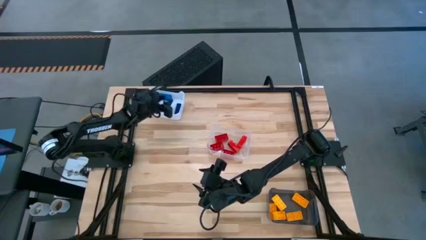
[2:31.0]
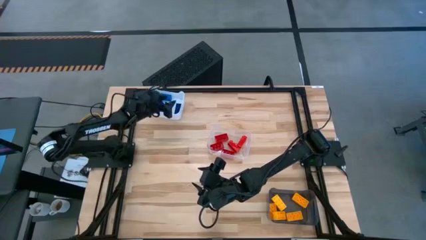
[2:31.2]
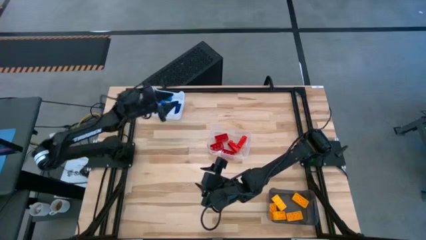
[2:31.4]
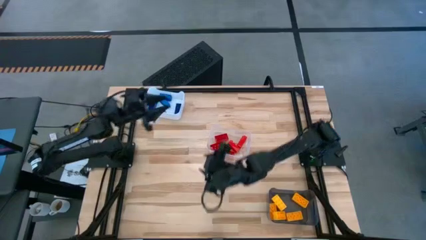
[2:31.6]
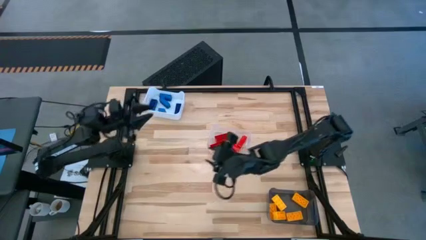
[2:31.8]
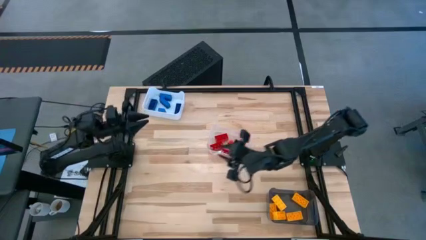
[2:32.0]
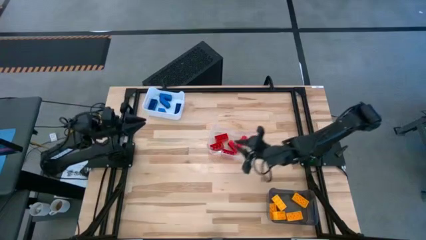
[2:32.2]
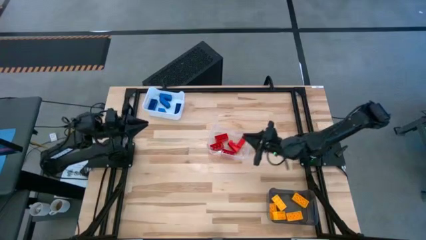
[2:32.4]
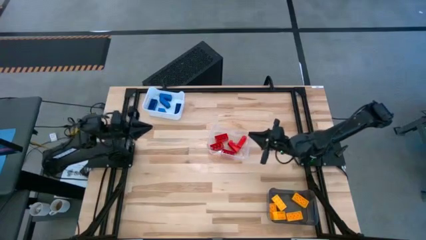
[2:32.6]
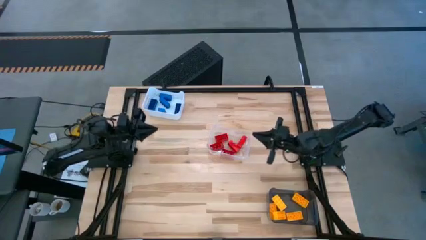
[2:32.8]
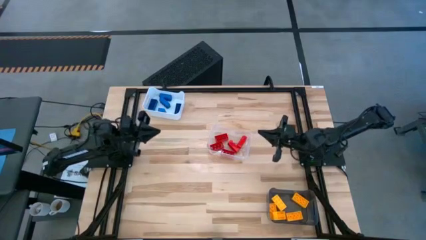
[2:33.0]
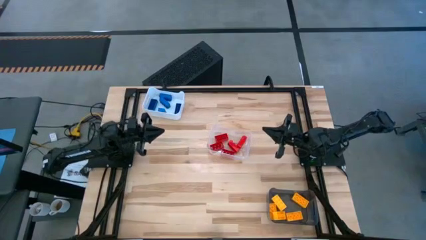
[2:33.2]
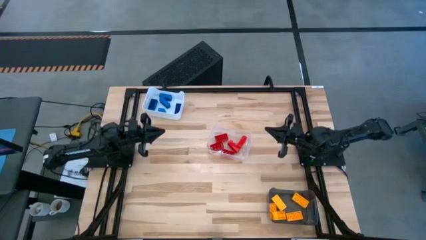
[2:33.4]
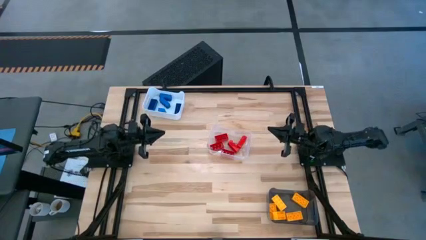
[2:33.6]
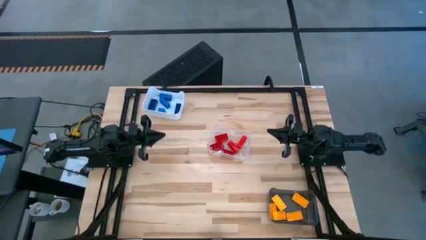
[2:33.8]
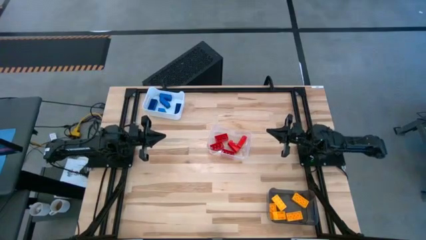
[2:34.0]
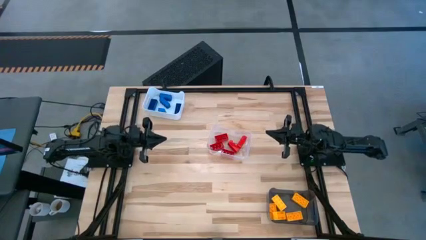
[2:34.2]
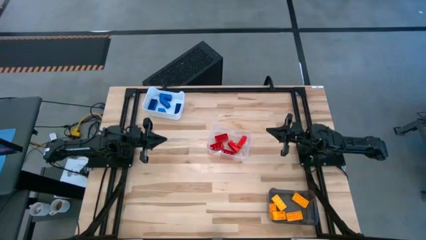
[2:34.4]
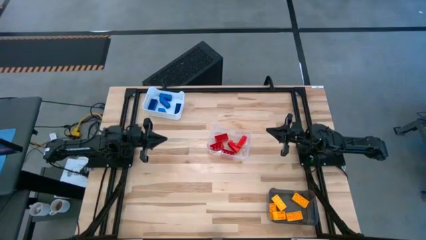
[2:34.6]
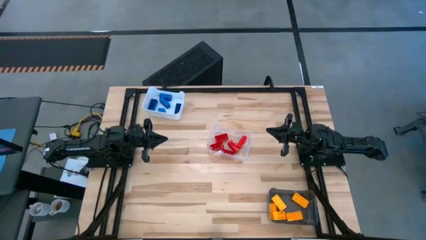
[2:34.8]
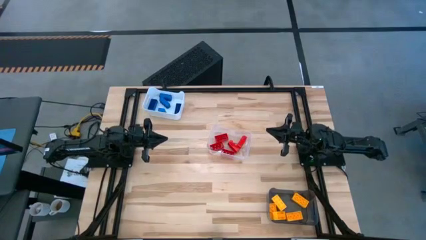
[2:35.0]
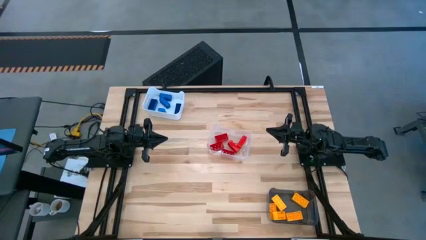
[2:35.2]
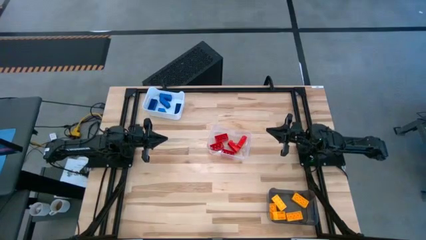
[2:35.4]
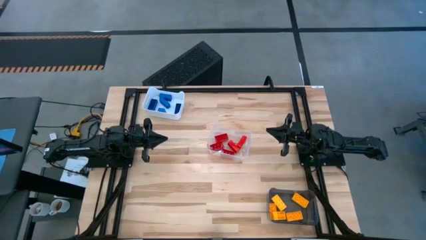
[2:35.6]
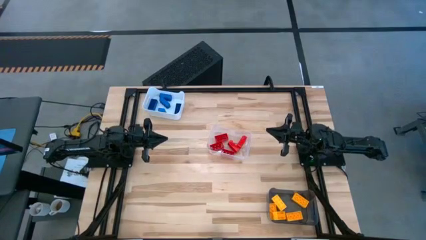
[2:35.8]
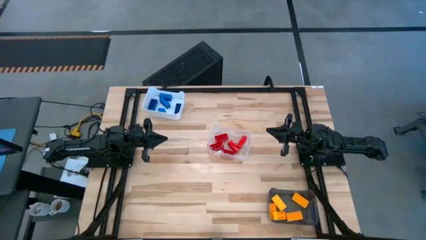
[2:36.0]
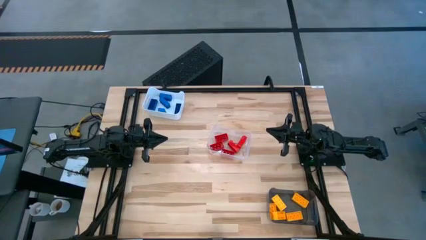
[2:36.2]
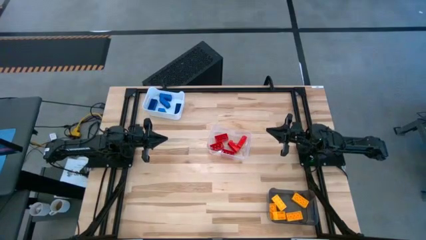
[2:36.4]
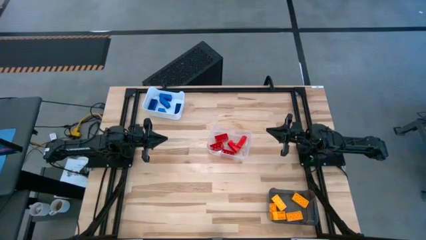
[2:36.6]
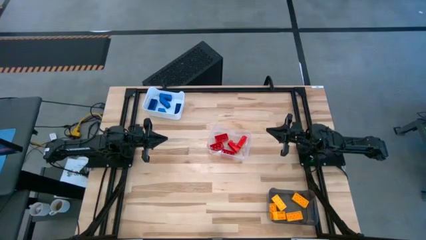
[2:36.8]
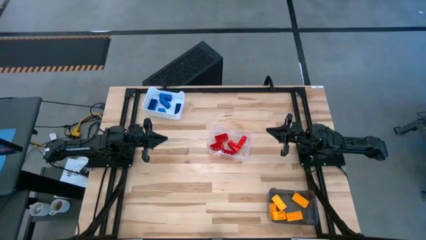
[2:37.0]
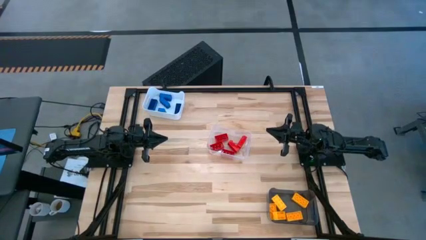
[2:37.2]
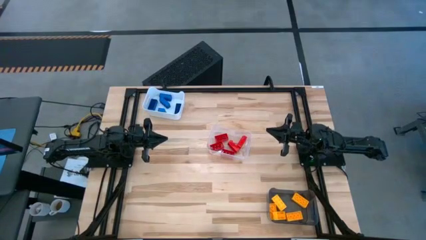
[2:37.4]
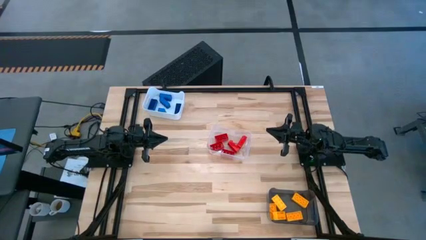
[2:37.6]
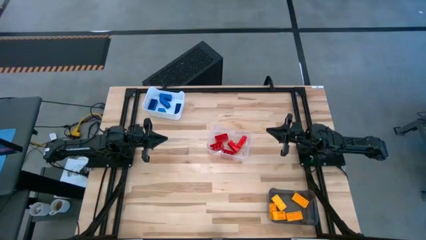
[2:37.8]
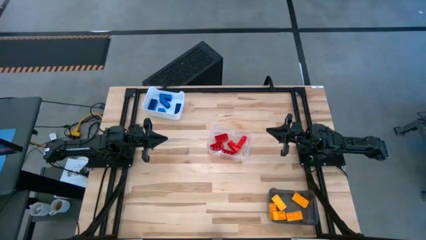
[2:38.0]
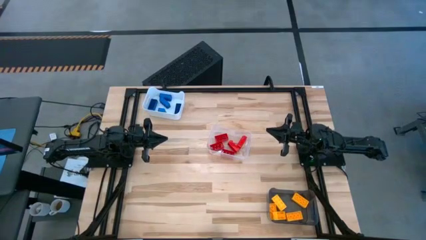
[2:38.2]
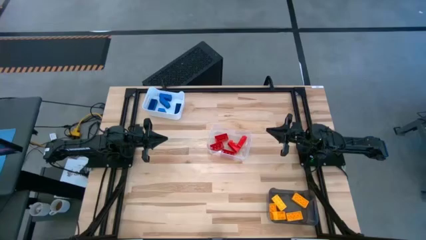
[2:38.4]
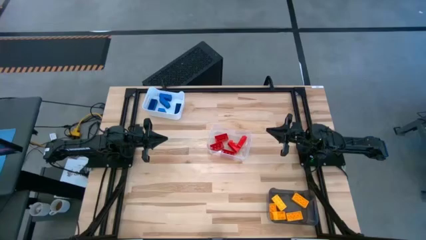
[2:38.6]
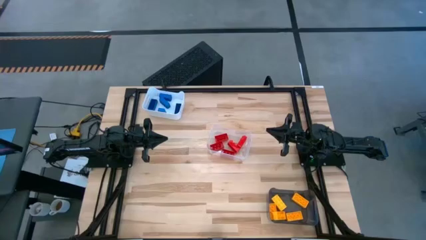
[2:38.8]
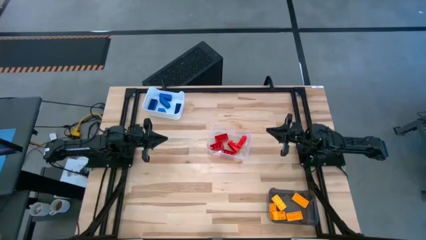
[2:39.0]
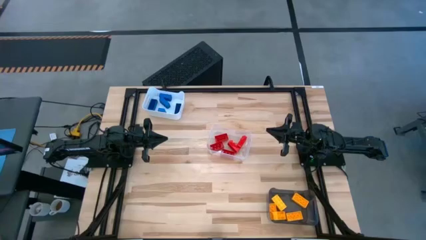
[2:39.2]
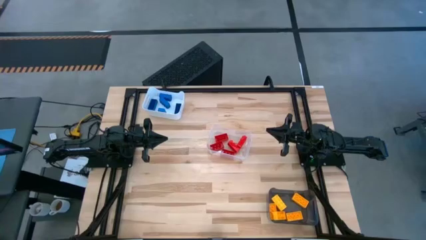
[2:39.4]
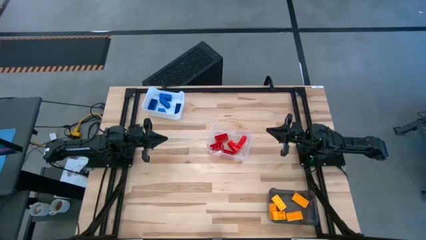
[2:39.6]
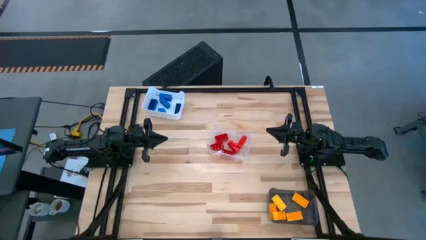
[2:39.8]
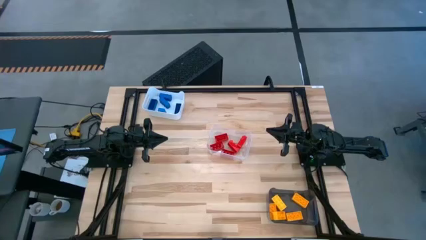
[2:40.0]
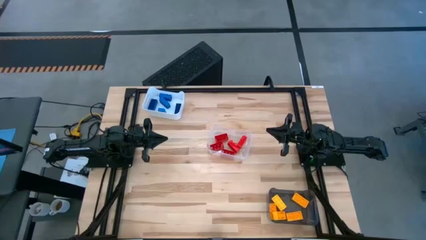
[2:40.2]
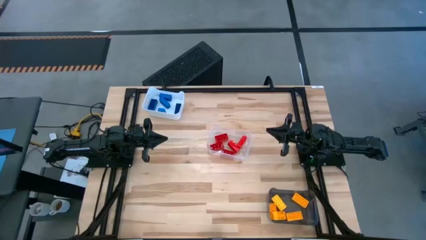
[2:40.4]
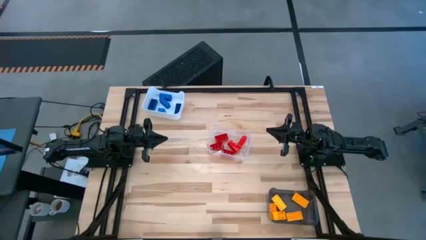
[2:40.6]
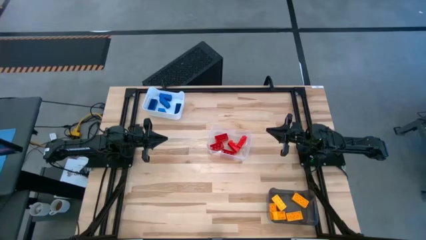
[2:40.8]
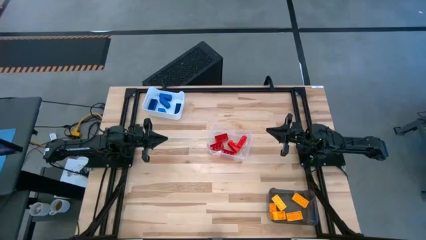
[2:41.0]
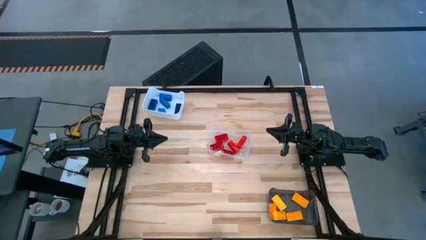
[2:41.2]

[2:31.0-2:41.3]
Task: Sort & place blocks by color
Return to Home Position

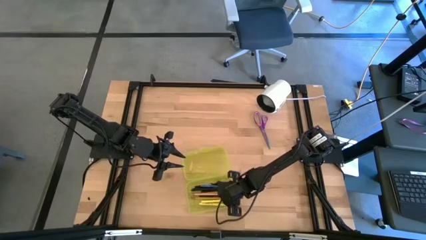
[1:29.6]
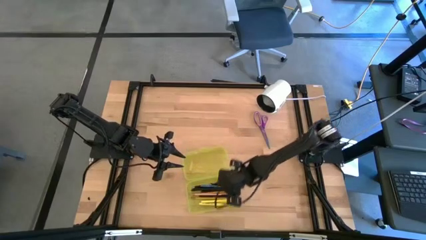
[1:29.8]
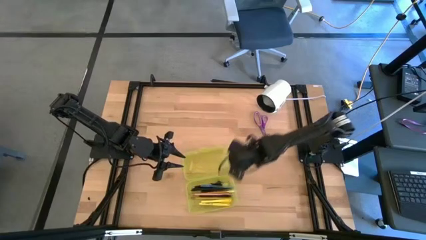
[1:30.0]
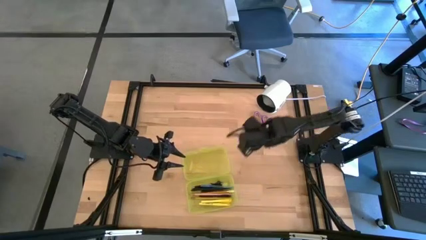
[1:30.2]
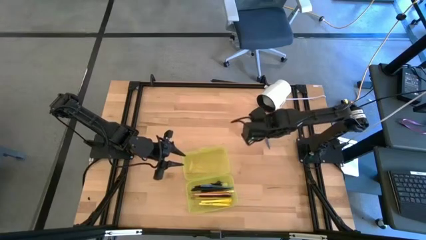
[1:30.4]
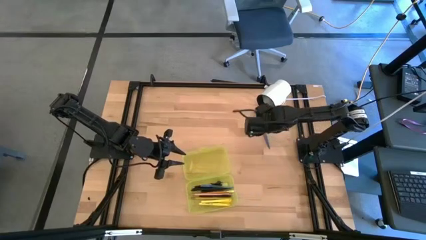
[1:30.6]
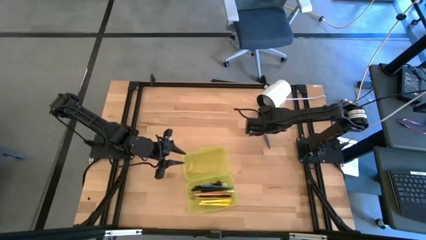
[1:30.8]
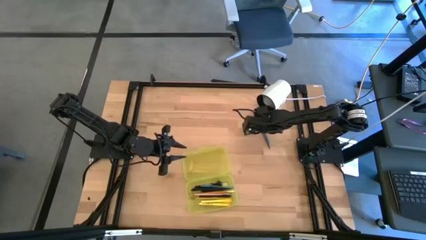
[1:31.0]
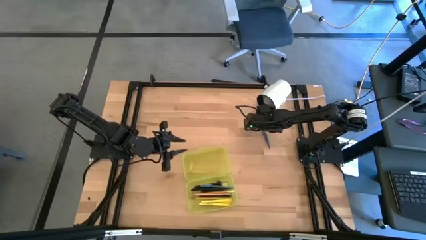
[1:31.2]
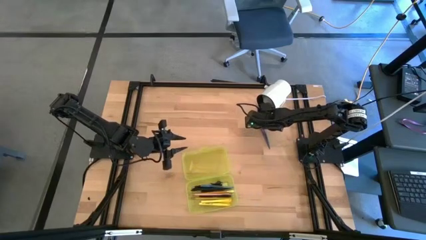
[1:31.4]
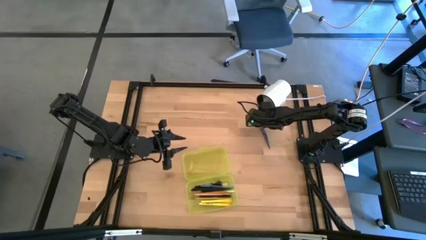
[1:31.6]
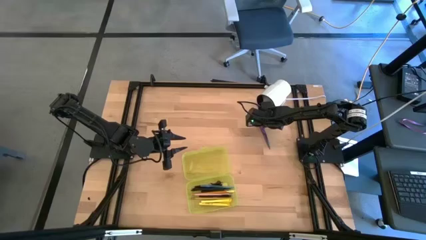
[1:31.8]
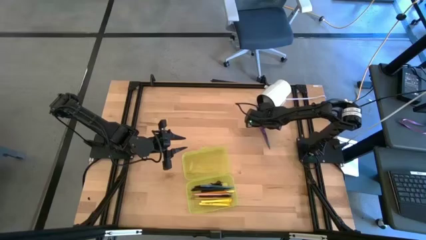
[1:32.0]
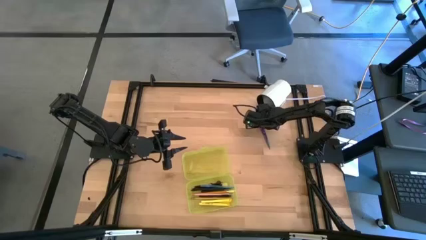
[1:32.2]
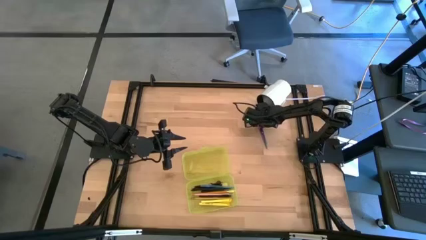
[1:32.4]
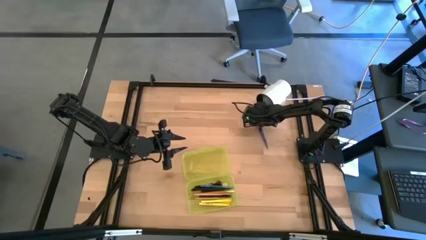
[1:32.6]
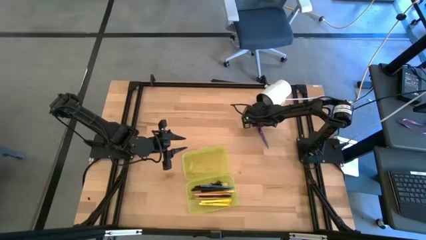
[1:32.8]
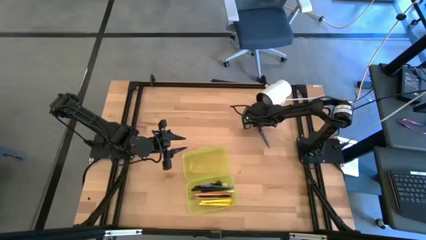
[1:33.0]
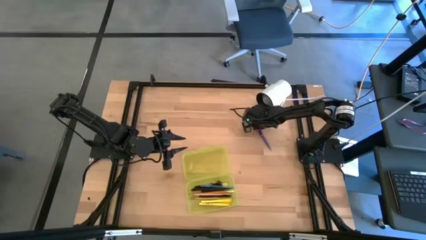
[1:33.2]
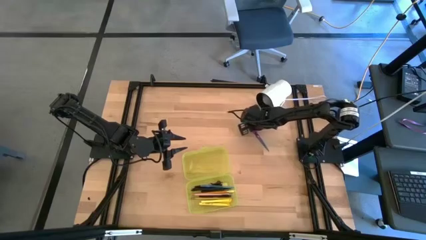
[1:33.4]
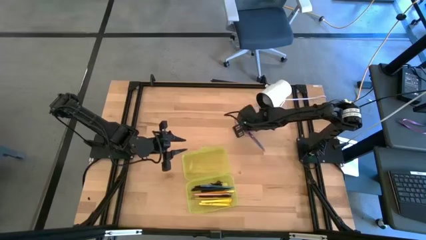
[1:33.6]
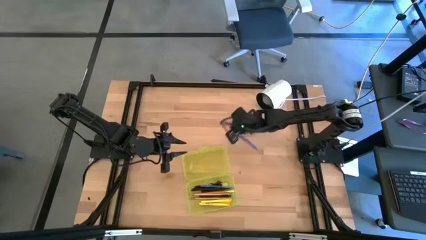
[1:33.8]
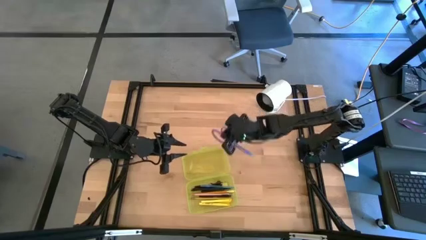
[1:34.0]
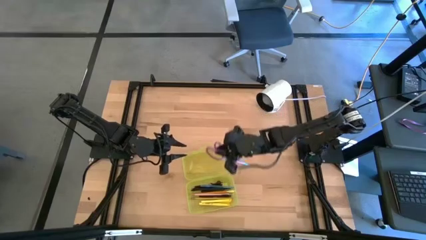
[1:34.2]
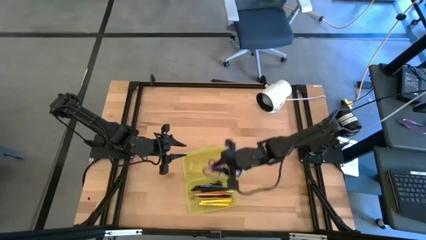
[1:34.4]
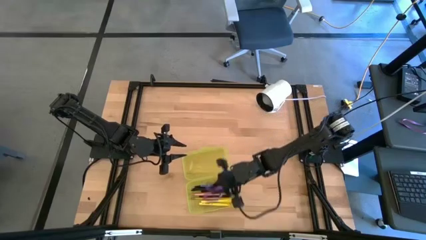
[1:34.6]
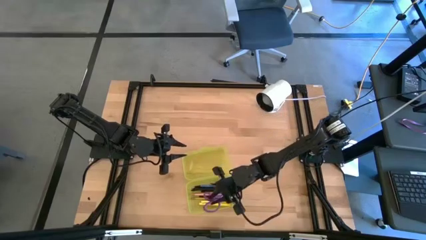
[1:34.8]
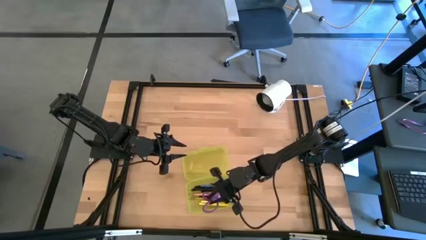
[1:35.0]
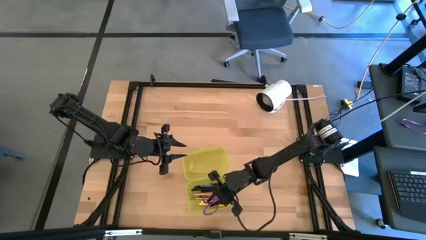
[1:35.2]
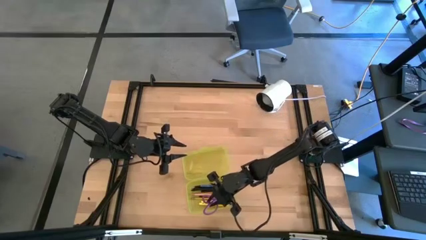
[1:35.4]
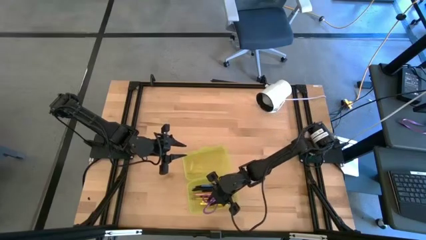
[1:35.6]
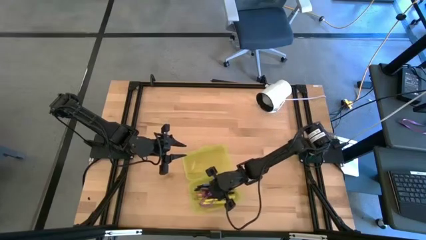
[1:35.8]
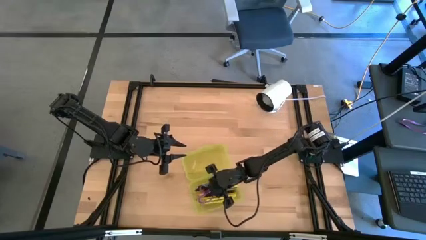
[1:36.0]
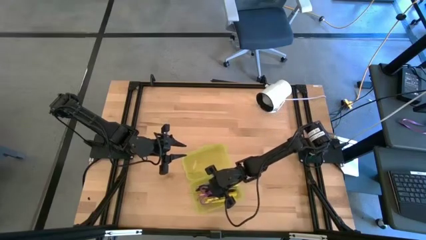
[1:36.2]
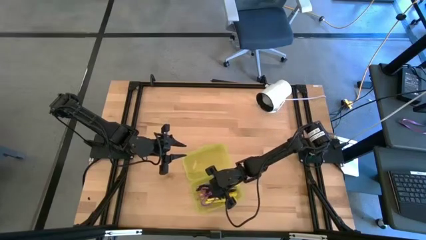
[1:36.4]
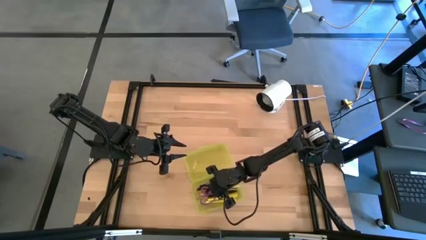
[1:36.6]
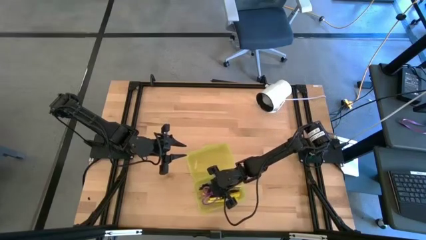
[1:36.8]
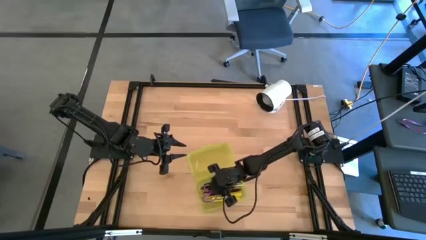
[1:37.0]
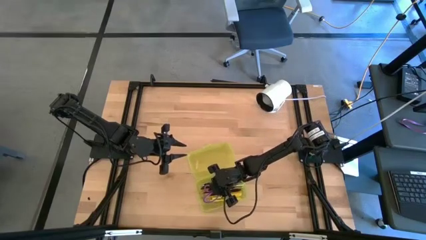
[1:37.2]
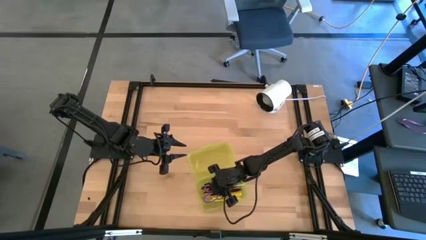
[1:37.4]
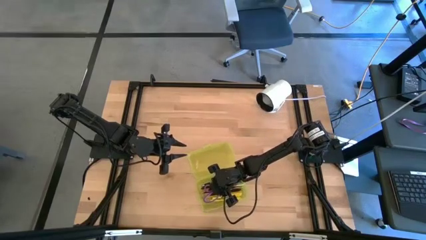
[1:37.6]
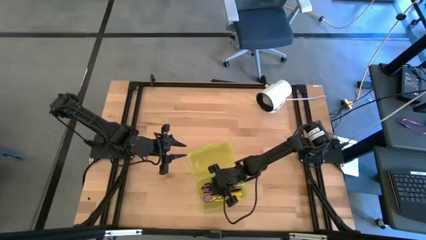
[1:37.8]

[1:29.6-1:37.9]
Task: Pick & place school supplies into a supply box
Put the purple scissors into the yellow supplies box
